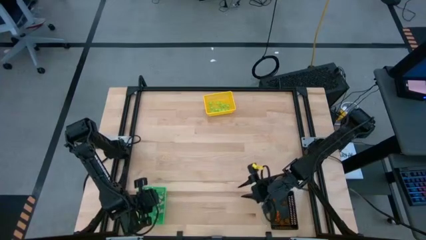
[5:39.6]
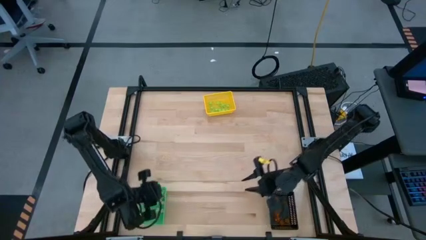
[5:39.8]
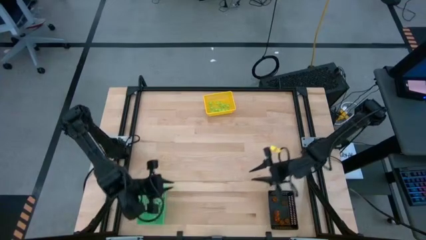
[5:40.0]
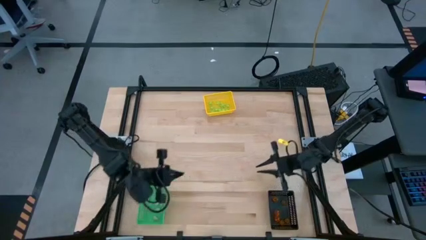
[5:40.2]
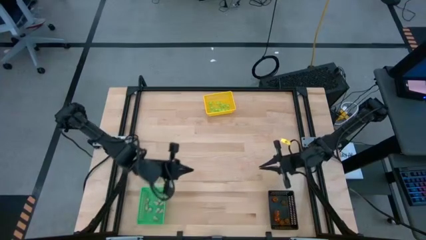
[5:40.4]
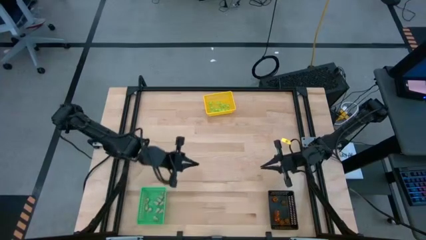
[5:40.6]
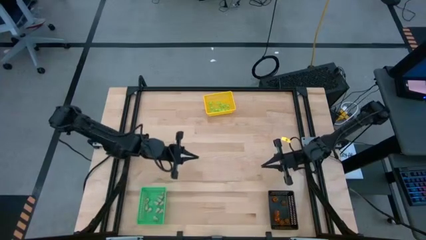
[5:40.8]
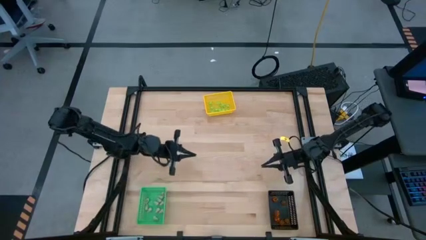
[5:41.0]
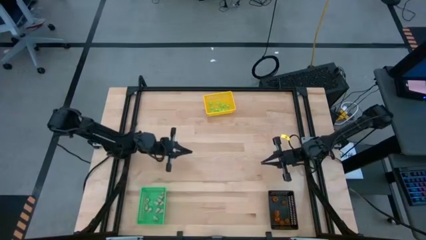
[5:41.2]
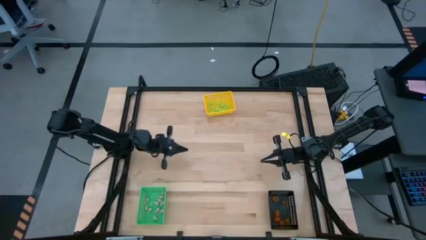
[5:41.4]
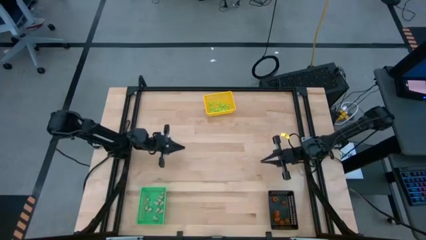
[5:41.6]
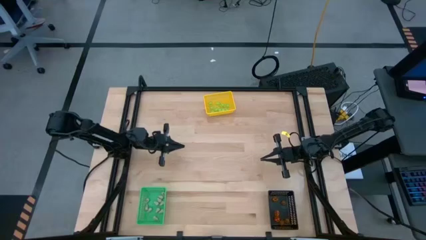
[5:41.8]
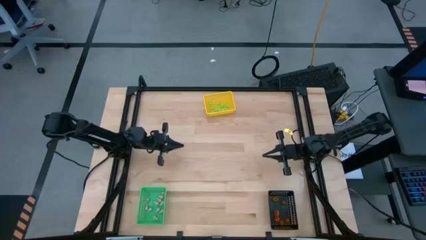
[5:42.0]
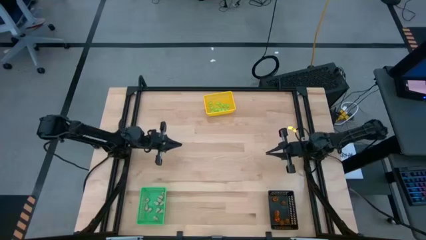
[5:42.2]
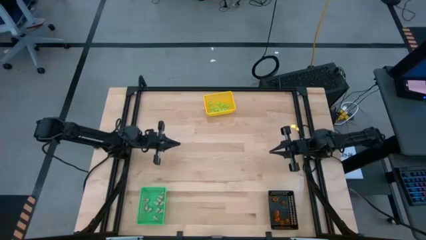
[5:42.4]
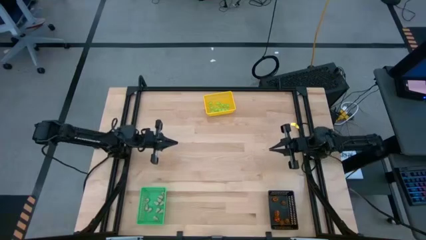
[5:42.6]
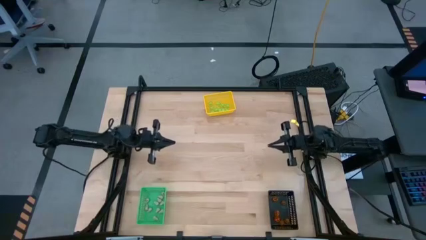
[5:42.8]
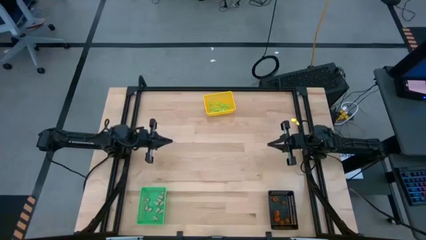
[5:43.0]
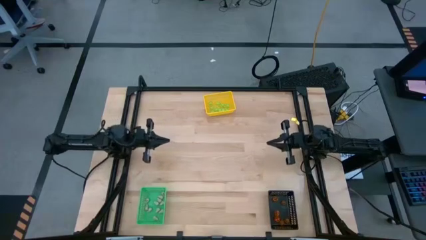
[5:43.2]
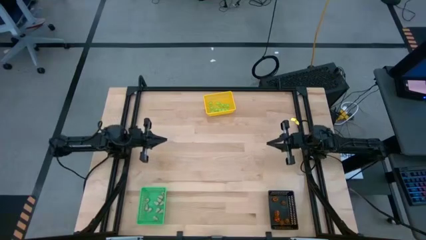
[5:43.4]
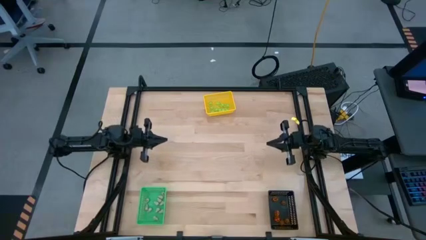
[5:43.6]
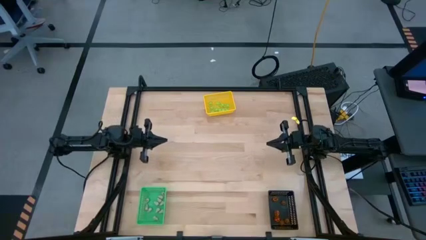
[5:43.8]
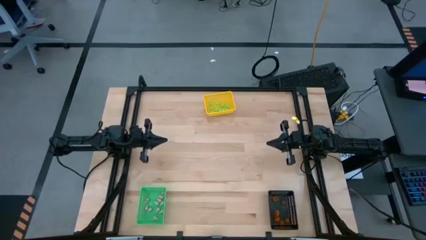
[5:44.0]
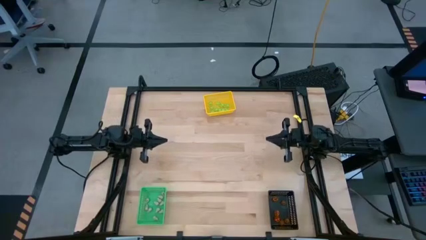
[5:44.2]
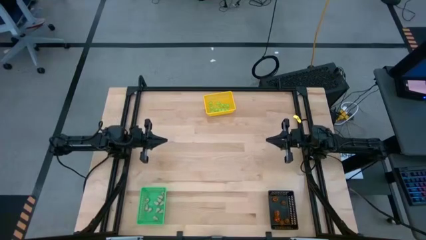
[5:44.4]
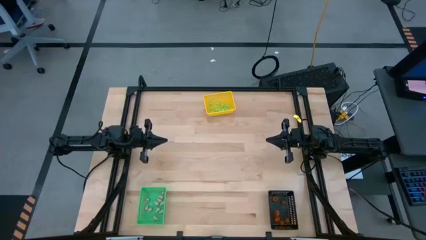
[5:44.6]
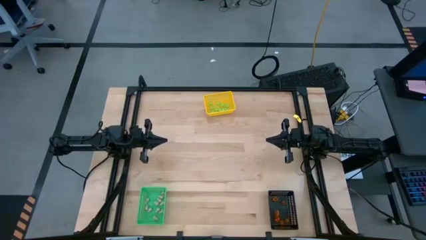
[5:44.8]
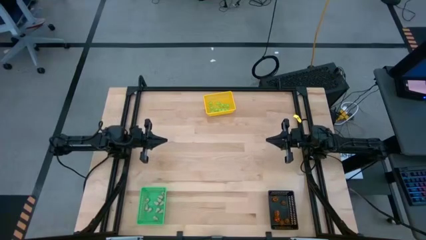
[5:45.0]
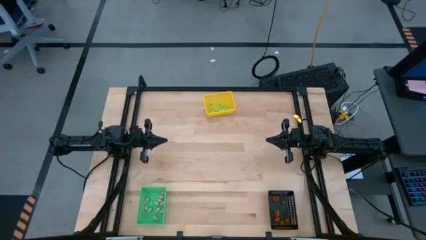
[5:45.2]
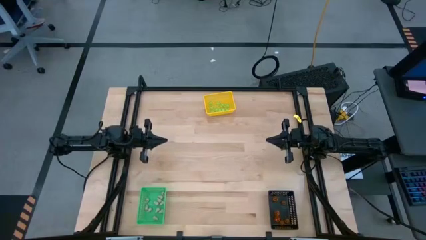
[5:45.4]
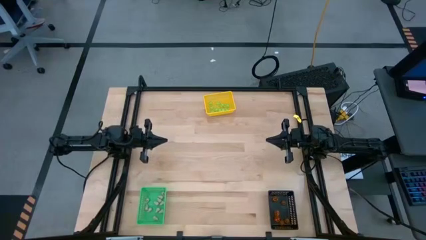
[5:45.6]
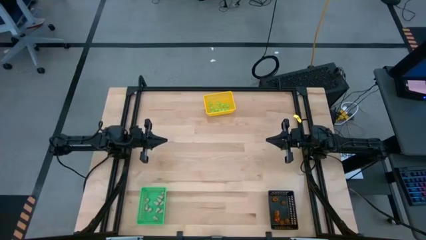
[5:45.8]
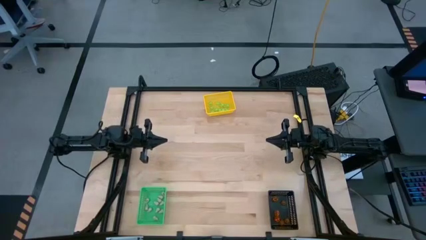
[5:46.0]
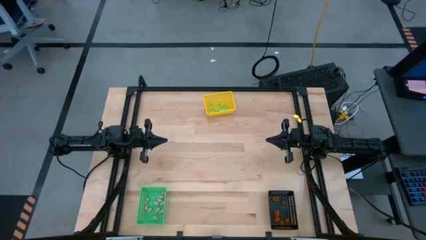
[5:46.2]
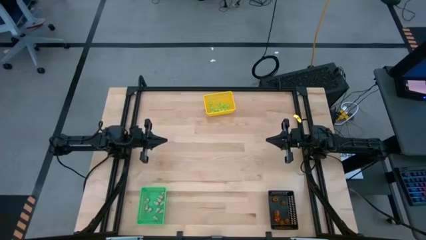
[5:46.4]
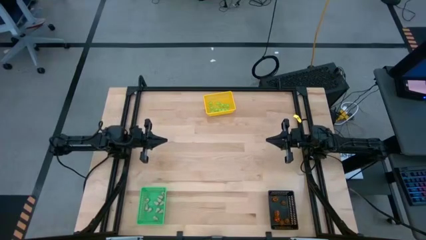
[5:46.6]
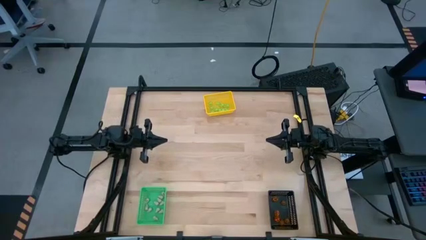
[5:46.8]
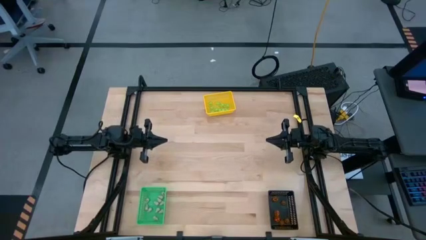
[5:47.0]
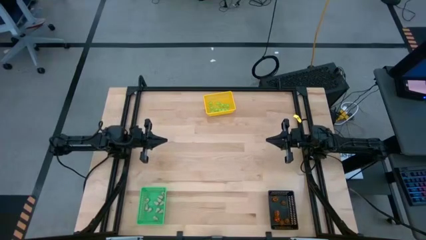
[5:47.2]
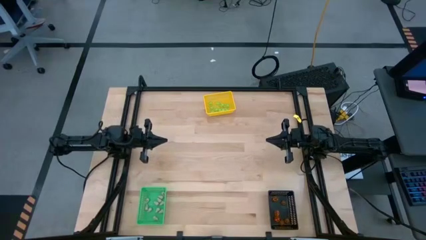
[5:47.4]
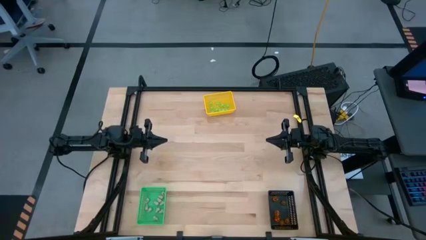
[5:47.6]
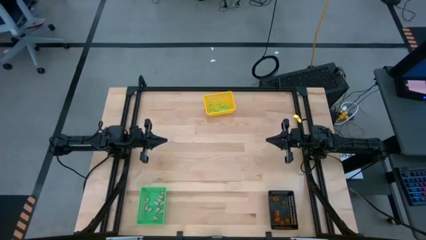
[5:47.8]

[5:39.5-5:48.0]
Task: Sort Halloween decoration
Return to Home Position

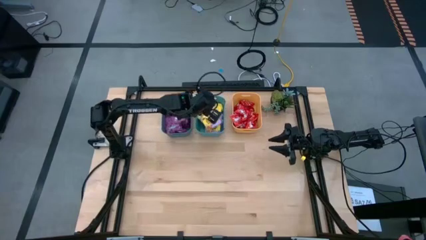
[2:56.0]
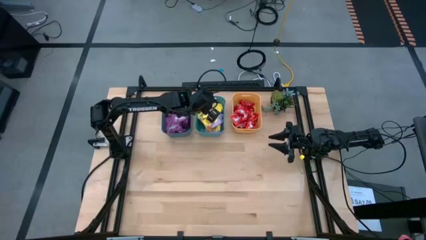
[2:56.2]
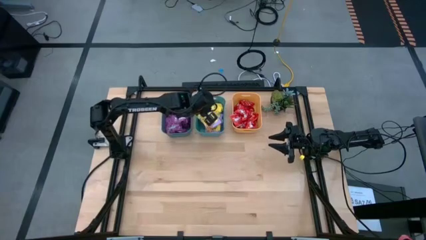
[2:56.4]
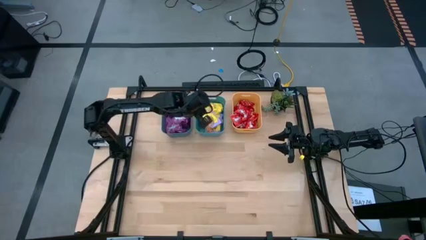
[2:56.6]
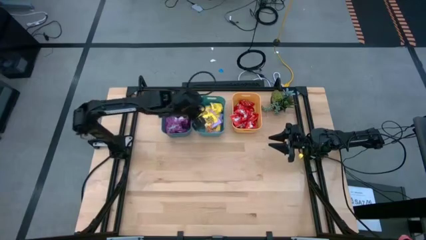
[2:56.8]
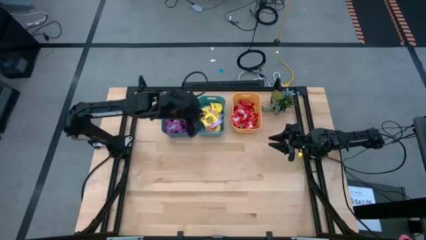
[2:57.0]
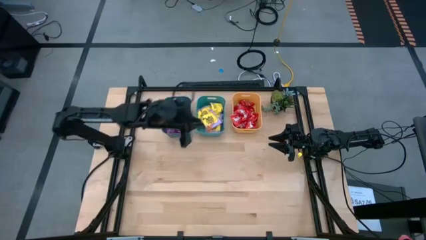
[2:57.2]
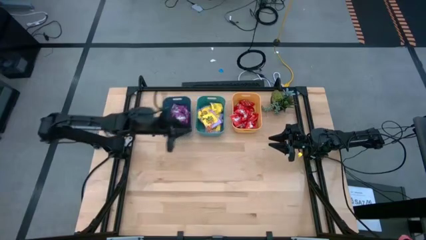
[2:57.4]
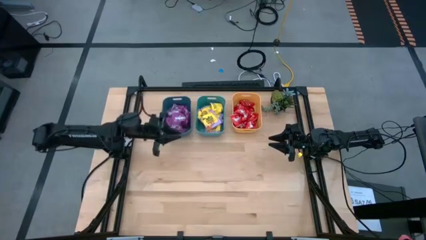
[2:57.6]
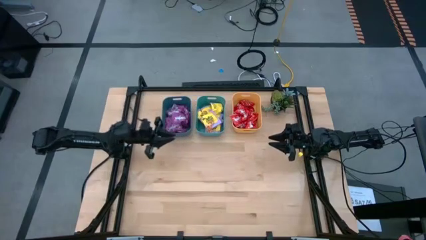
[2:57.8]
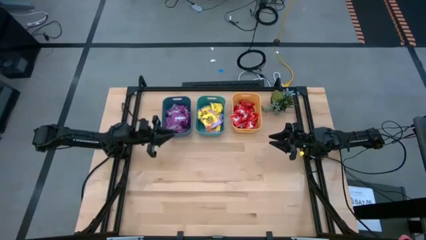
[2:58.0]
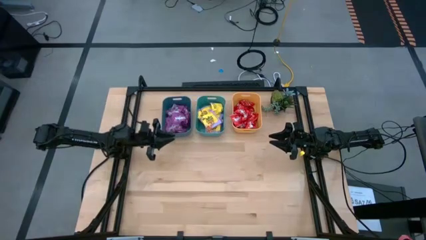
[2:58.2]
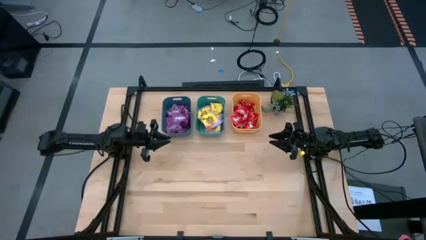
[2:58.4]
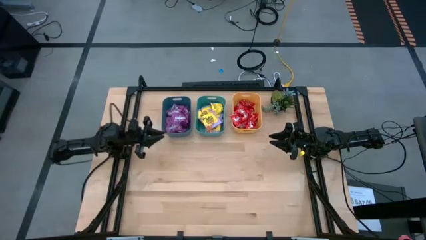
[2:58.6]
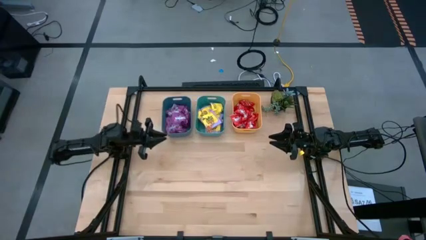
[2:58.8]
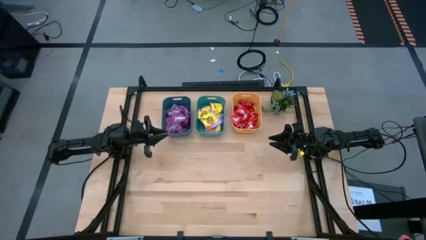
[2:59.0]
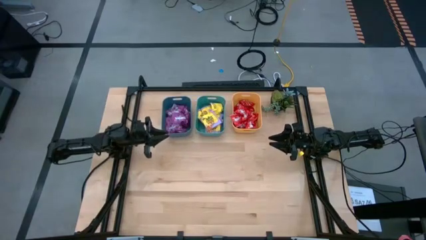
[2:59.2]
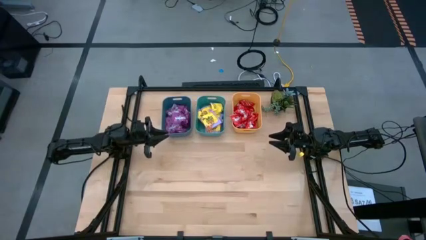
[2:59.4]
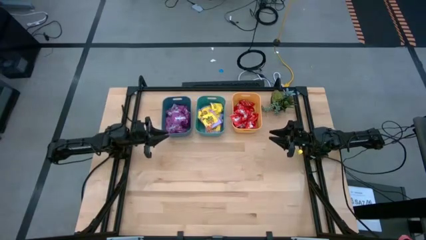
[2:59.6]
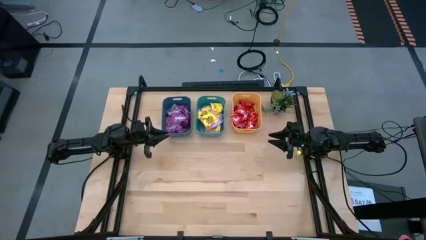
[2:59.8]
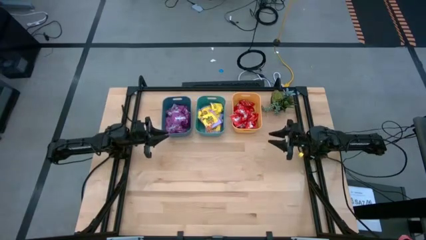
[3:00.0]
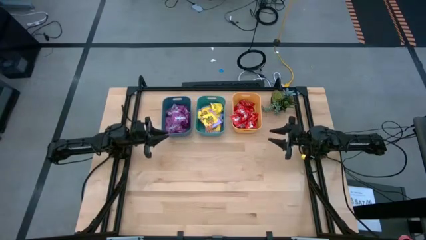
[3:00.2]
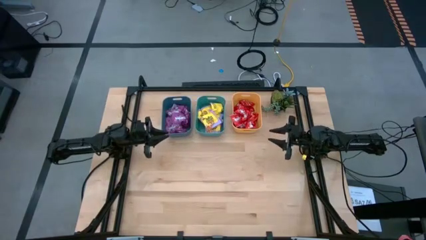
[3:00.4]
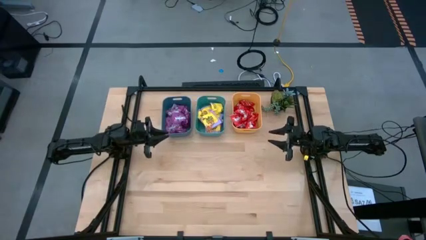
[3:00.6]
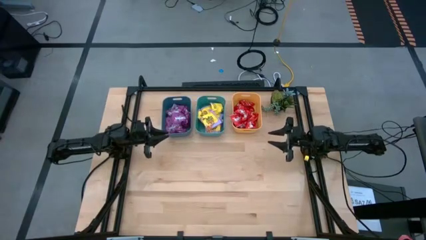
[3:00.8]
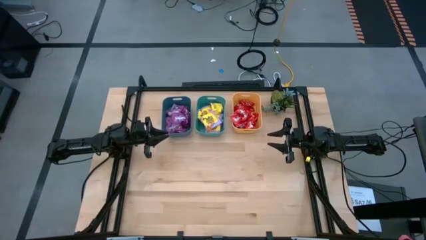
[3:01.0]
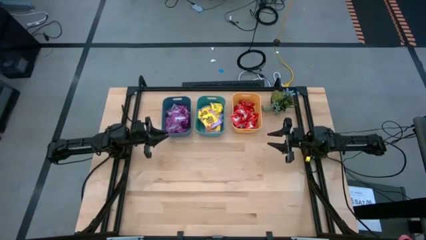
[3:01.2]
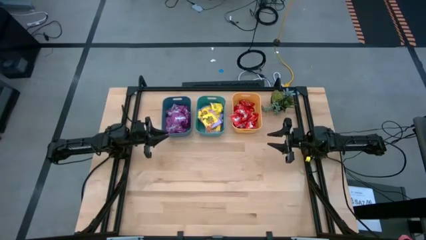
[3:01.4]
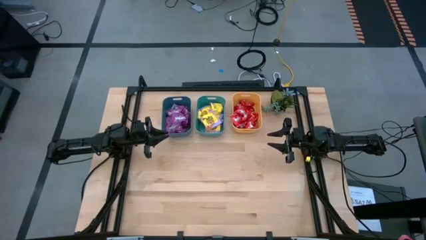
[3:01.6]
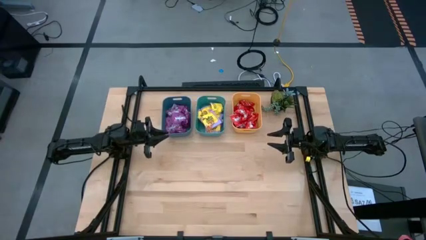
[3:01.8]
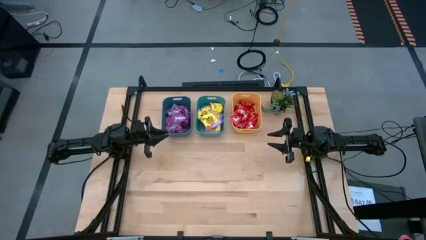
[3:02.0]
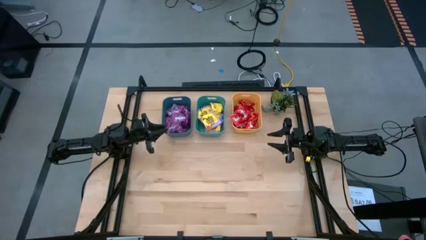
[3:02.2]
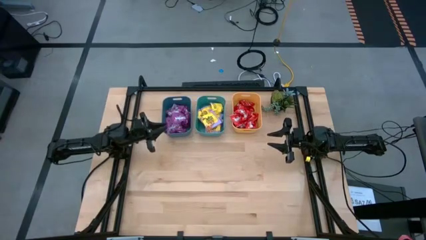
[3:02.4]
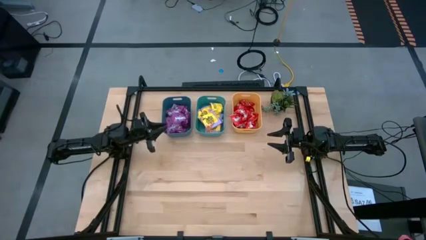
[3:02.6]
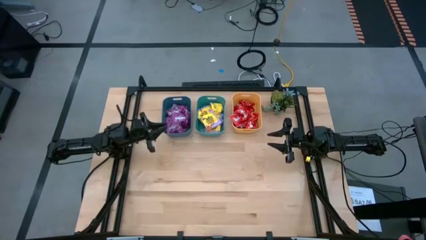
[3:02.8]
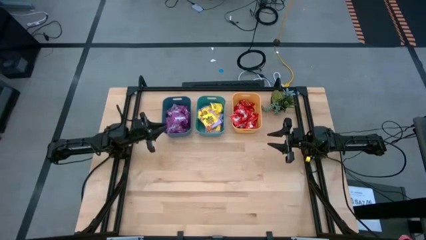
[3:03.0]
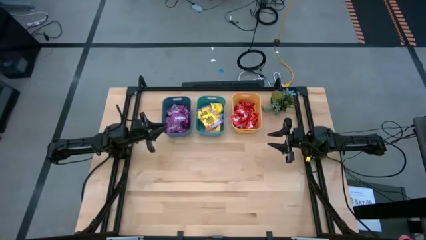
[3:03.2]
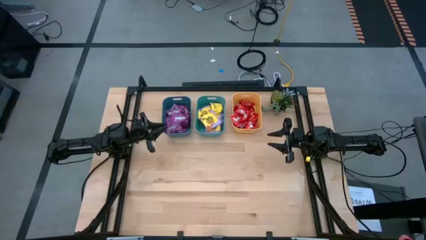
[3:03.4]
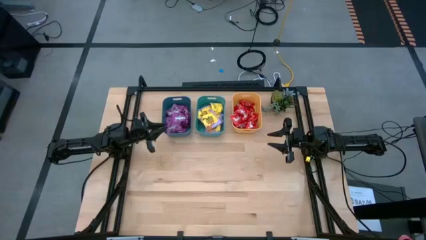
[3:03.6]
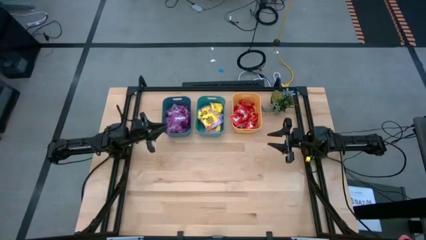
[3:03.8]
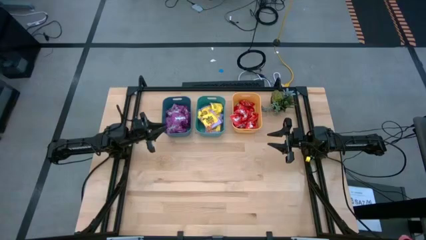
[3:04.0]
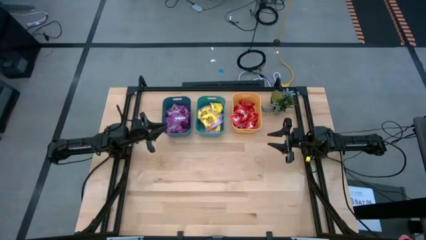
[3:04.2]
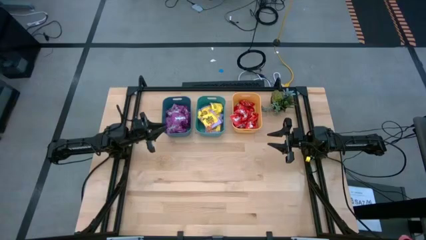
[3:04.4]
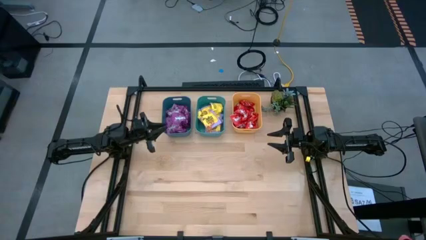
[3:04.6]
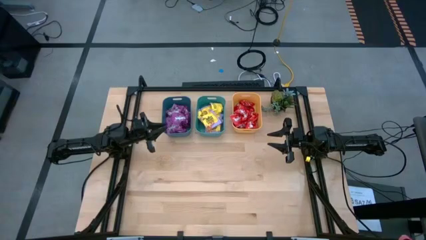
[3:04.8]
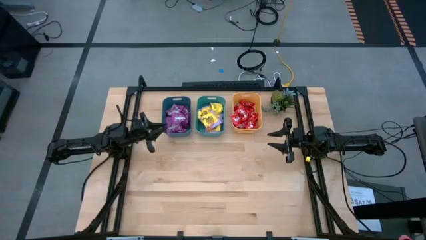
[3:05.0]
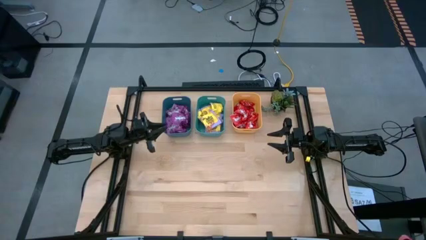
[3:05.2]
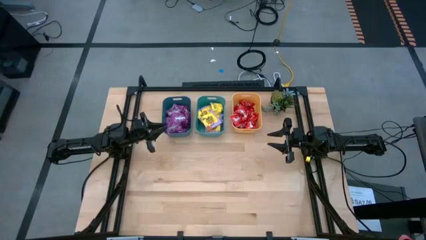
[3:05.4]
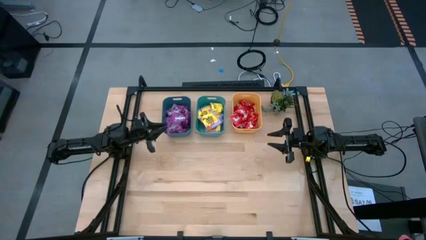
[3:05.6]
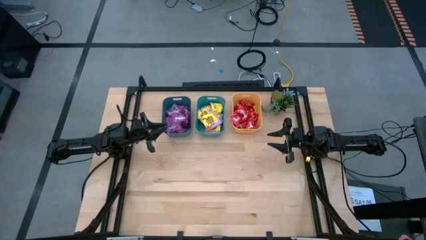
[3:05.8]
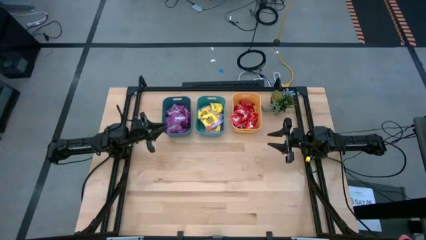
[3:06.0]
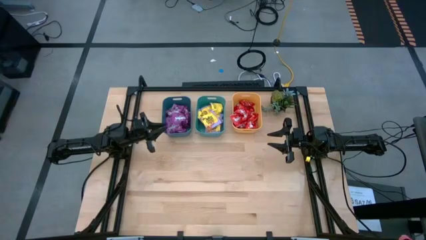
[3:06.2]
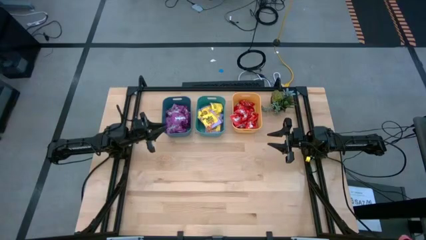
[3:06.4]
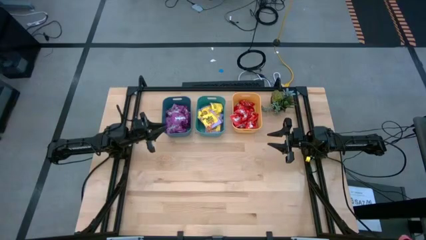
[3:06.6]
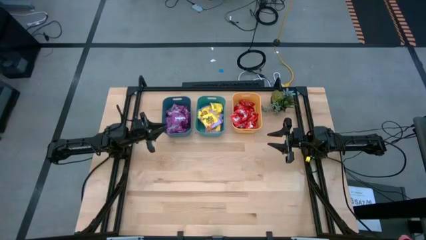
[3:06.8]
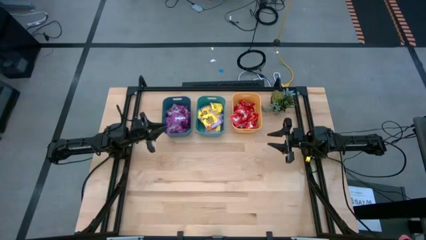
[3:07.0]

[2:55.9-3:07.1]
Task: Sort candy
Return to Home Position
